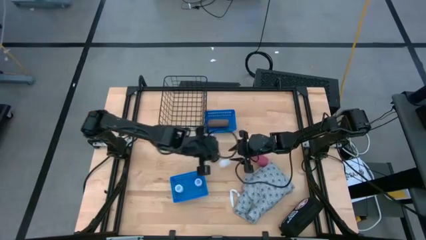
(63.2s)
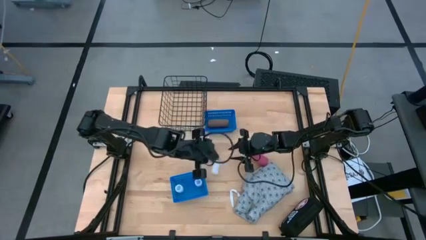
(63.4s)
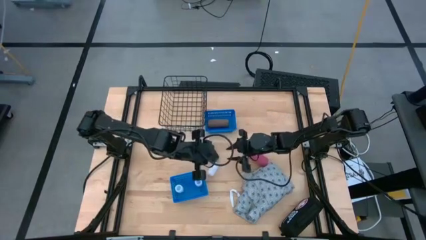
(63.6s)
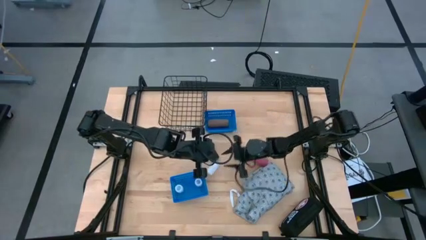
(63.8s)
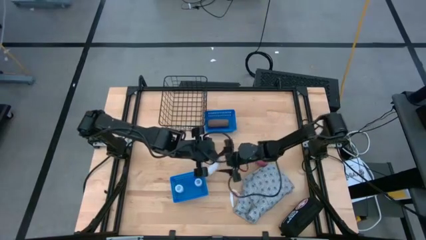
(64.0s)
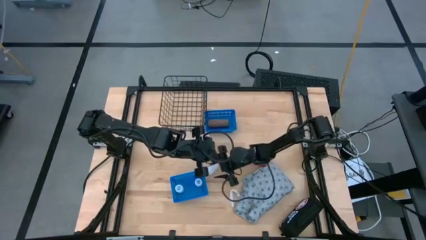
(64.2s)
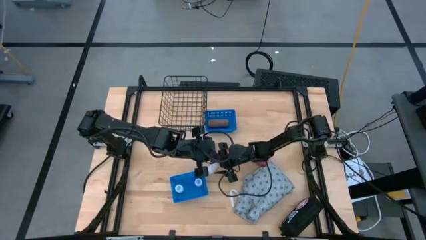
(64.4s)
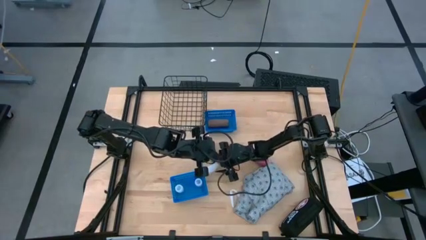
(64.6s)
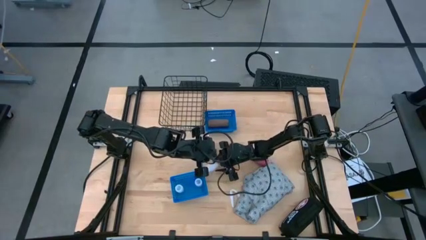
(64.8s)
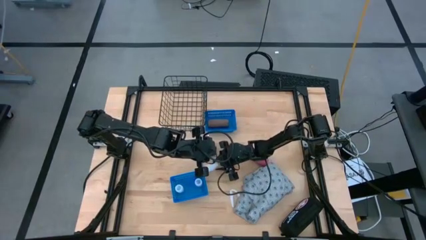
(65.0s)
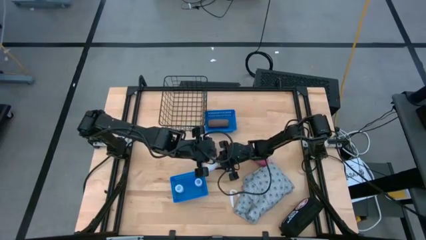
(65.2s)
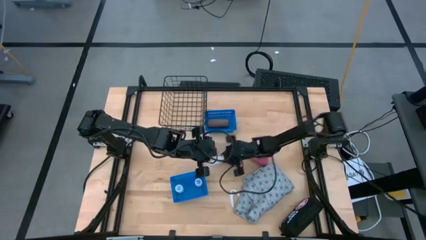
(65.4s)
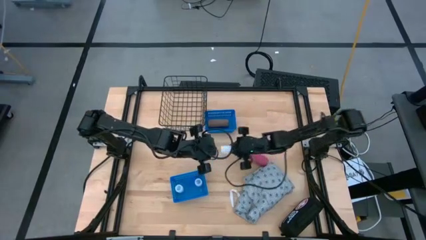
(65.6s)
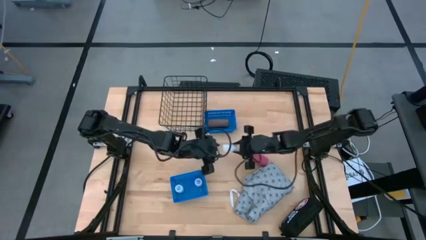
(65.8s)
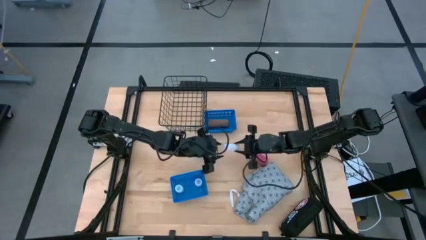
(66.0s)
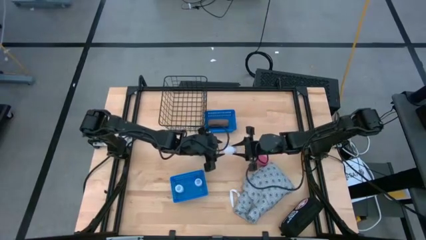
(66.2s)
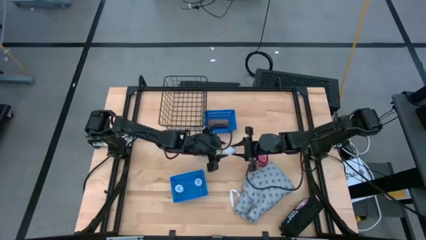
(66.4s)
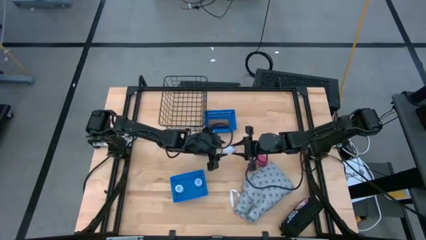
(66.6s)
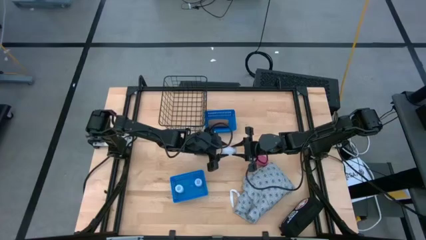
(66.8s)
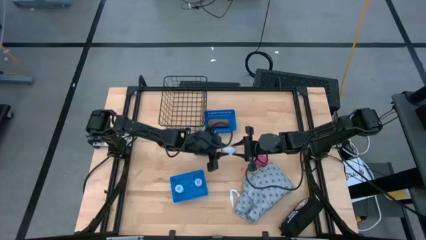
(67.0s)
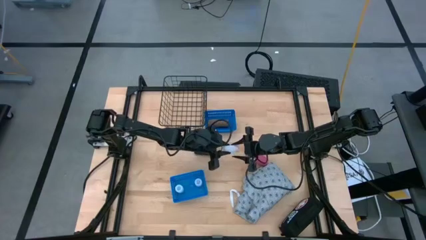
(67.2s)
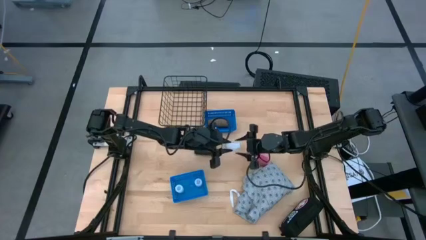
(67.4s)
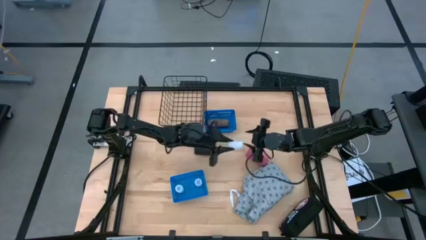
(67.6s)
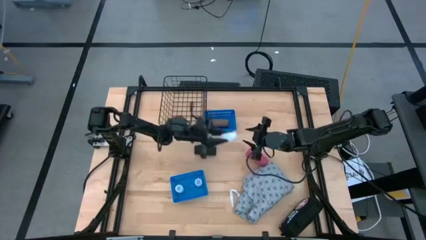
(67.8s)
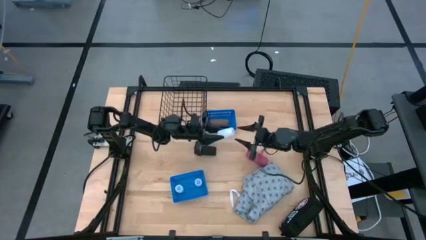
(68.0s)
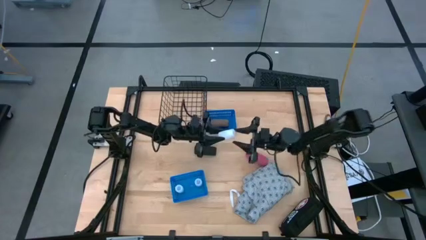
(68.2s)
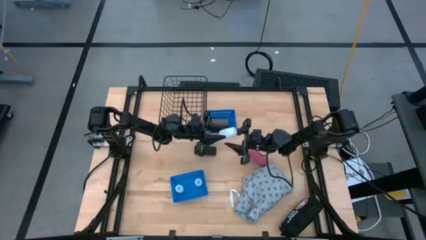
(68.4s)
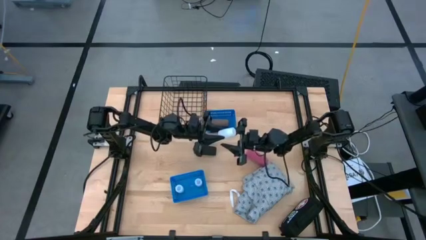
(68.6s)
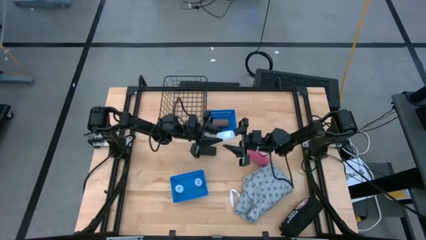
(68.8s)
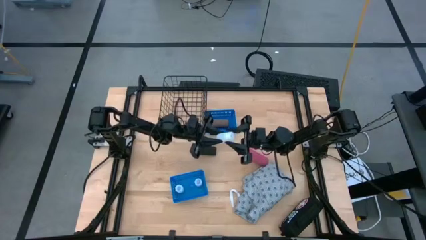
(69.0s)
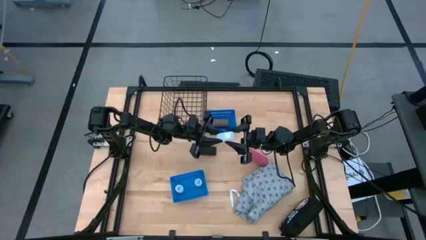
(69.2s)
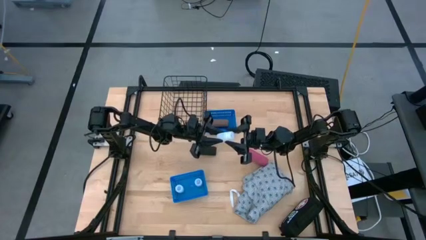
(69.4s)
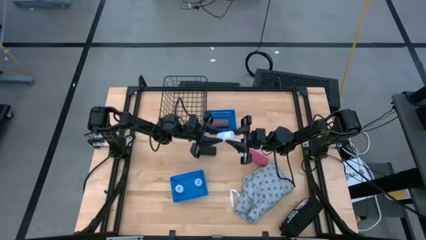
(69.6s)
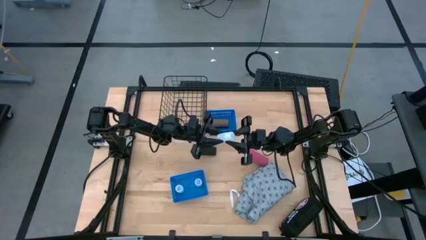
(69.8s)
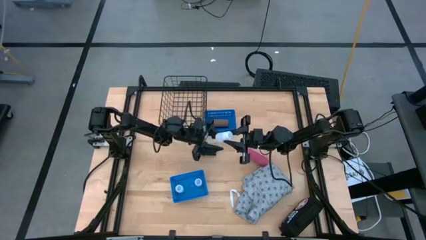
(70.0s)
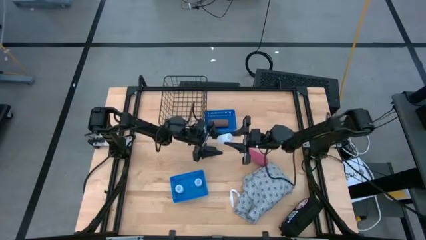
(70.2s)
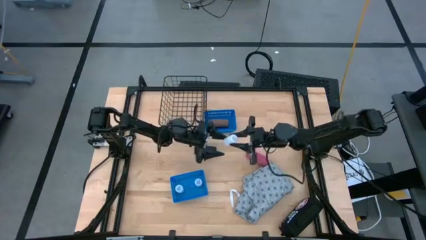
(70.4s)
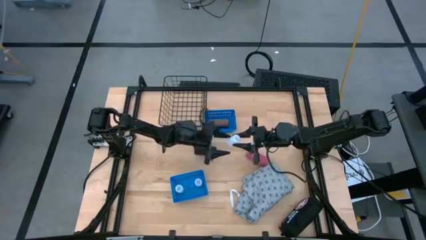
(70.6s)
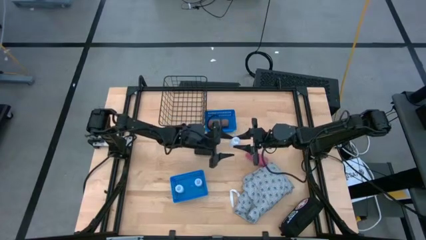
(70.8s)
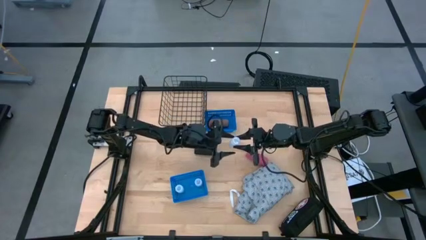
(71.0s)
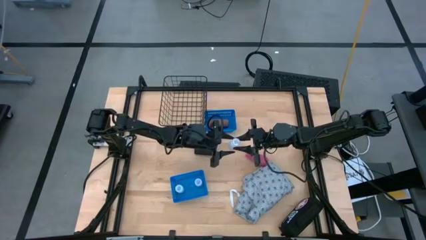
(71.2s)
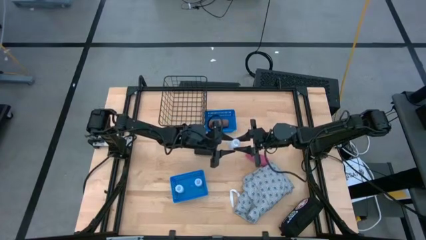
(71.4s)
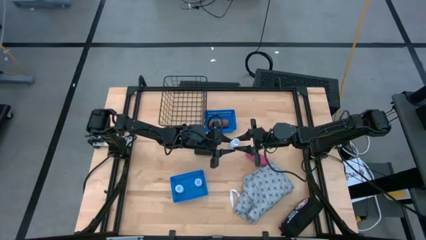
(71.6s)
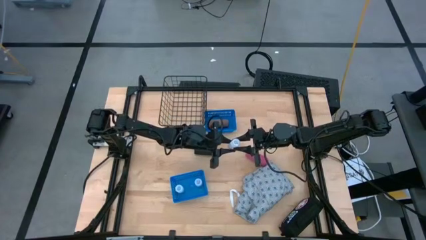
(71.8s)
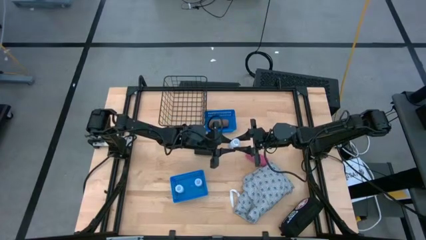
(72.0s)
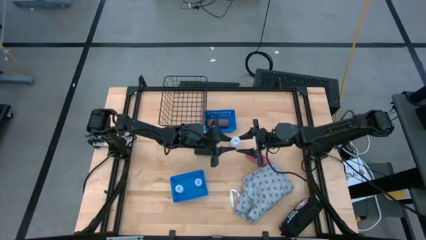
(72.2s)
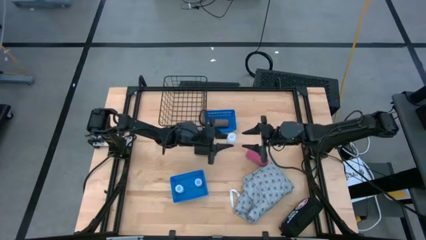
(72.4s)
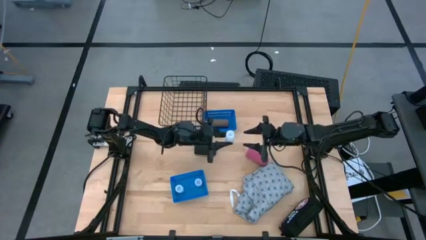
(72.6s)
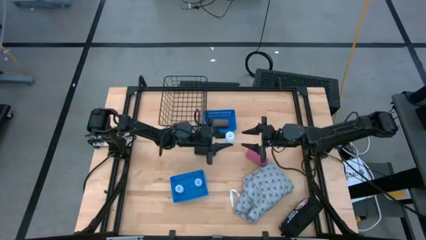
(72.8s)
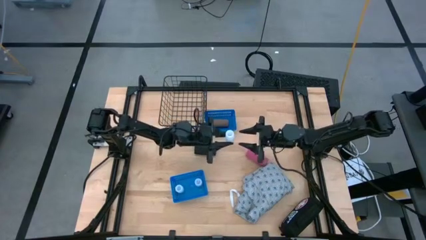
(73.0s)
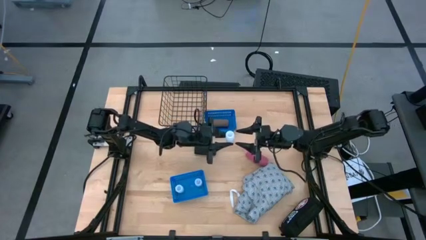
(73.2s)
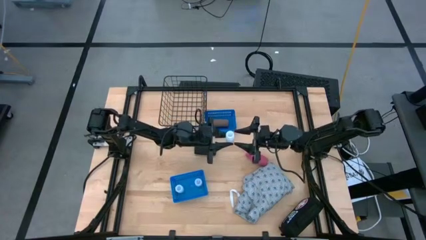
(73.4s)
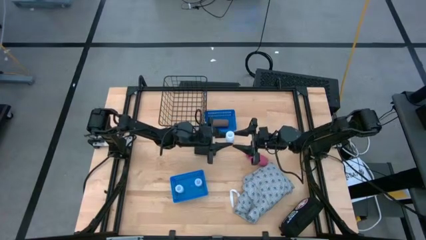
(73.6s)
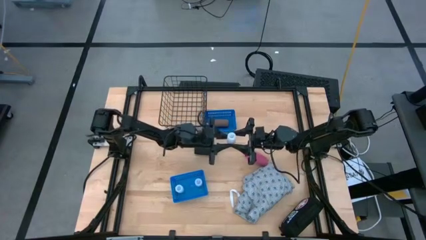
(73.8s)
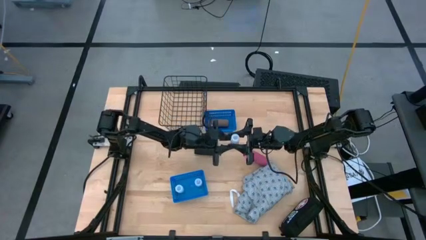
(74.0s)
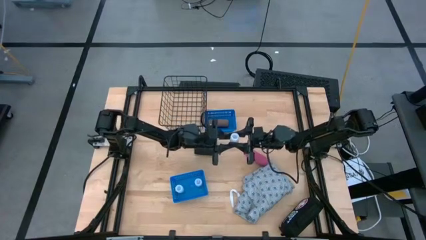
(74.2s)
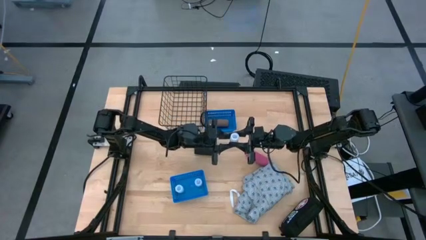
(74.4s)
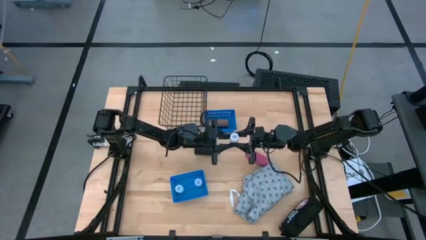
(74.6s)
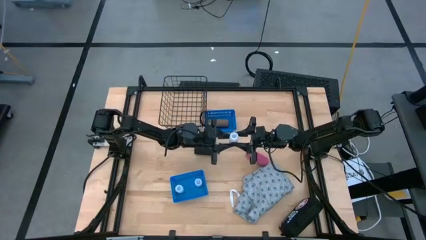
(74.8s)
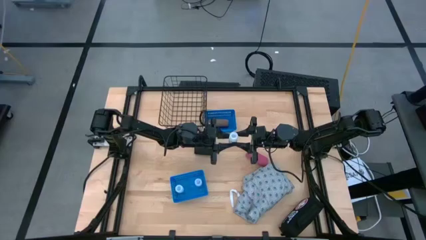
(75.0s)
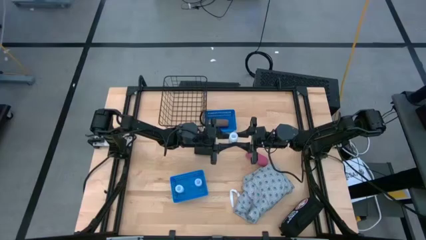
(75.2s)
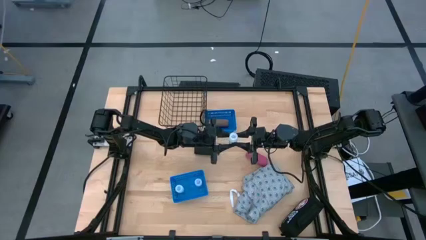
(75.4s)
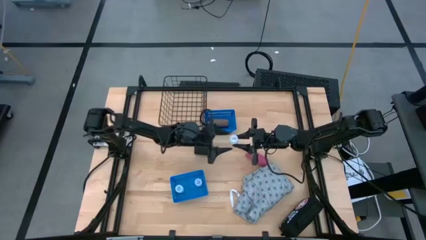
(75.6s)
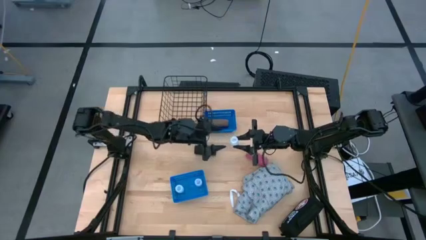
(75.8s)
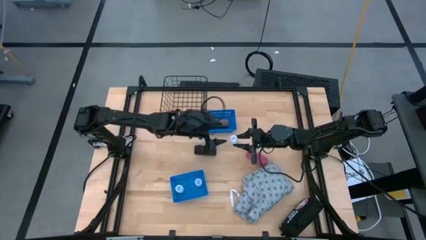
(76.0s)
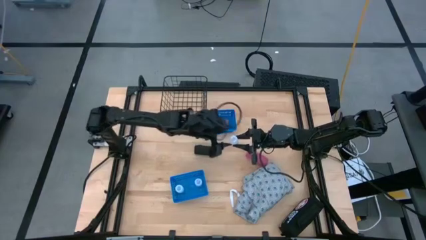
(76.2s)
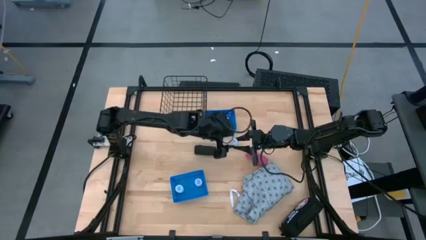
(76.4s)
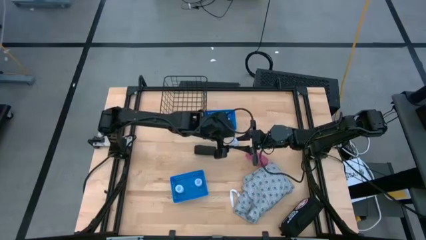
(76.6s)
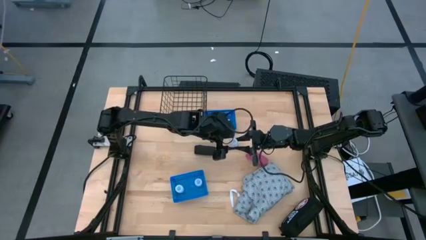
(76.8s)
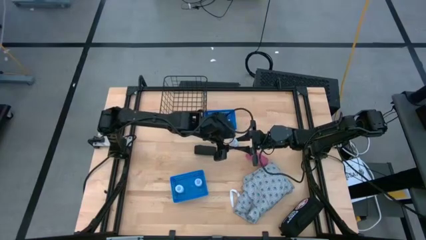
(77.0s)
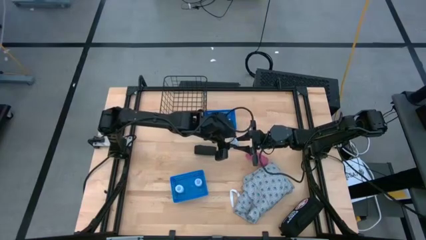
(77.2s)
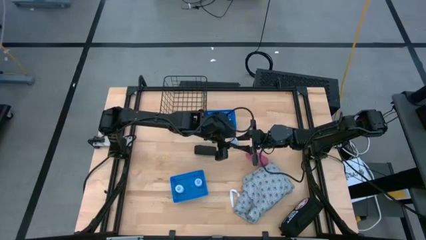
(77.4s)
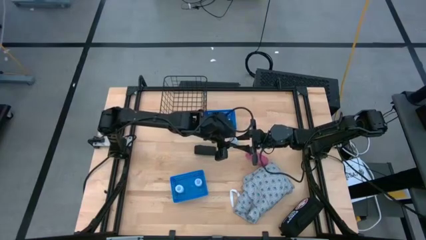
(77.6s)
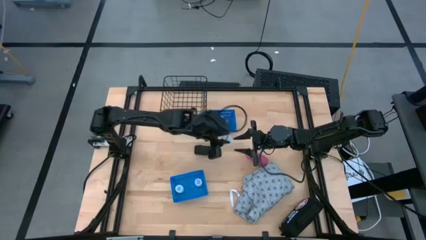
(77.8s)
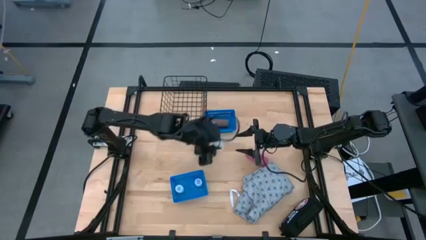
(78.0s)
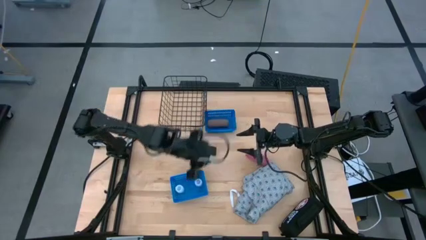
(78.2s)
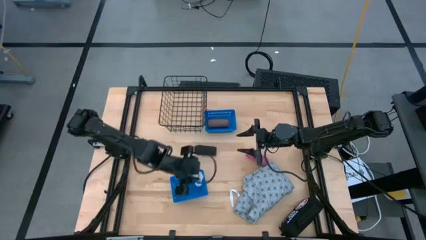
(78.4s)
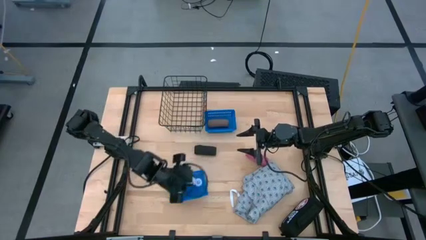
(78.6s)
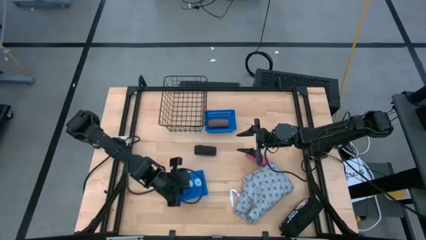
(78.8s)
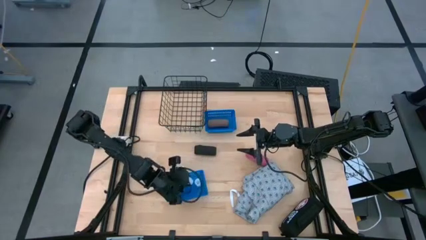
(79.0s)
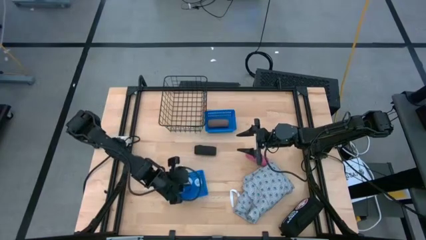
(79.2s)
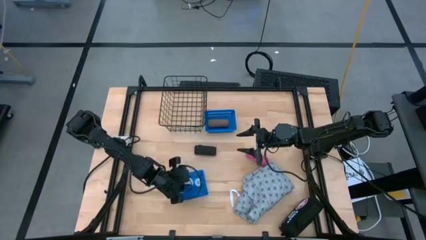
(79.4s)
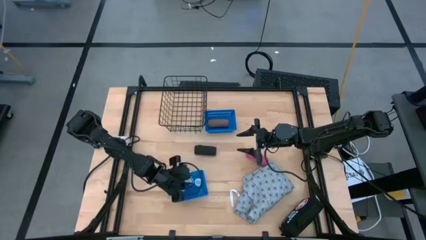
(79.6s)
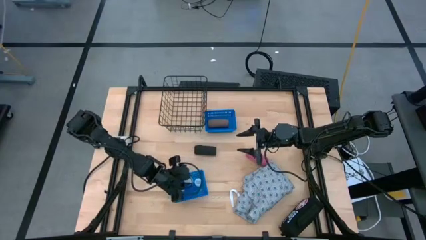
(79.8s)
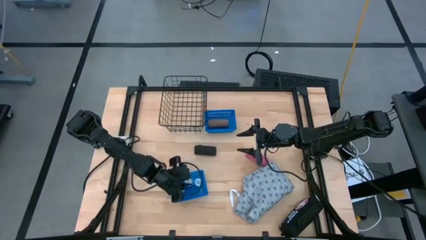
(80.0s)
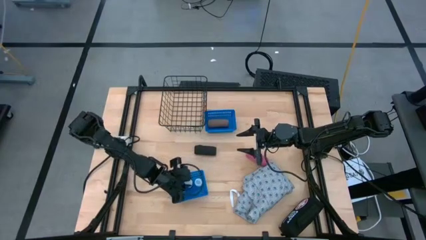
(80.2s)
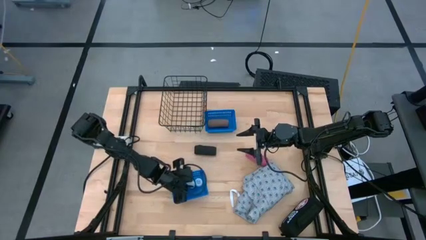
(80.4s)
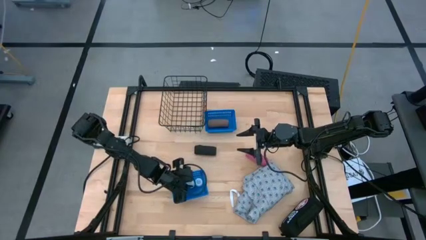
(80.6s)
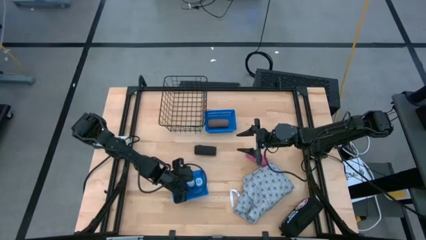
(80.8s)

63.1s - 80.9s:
Task: Pick & Place Medicine items
Put the white medicine bottle into the bottom blue basket
